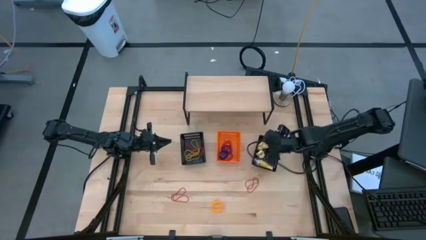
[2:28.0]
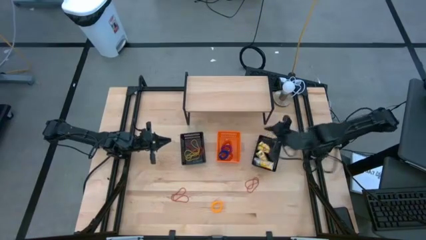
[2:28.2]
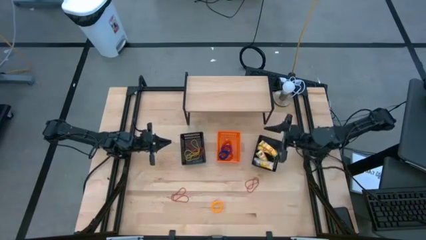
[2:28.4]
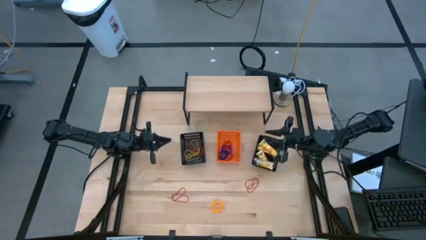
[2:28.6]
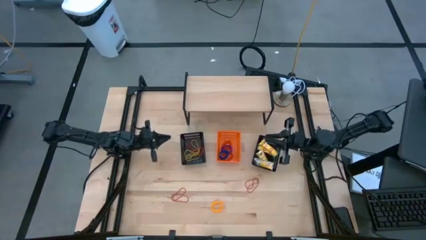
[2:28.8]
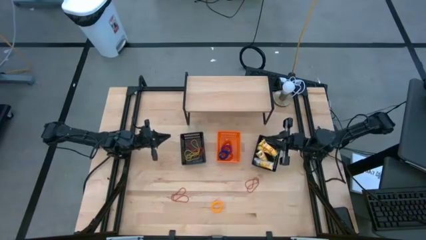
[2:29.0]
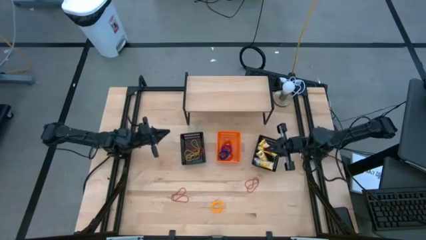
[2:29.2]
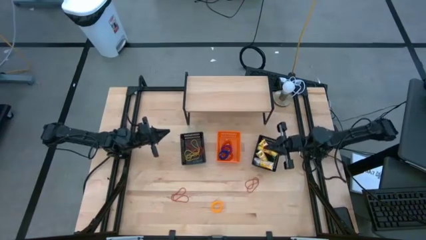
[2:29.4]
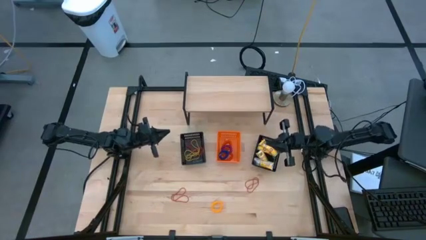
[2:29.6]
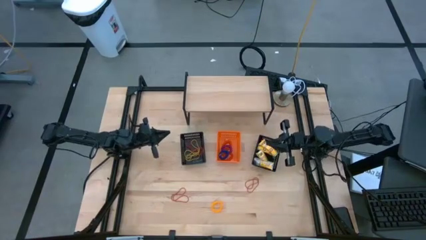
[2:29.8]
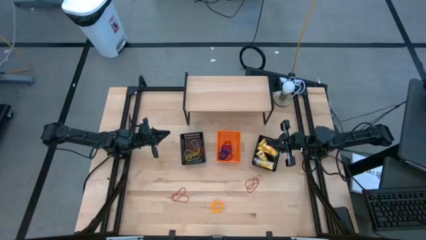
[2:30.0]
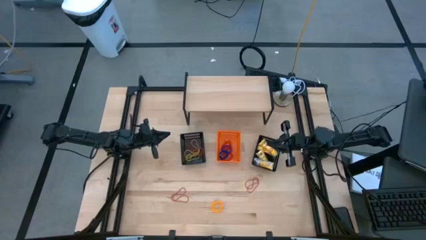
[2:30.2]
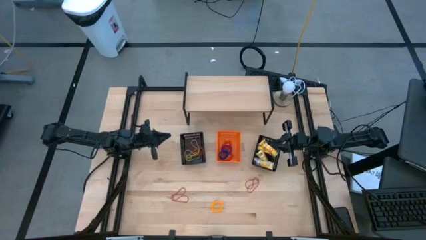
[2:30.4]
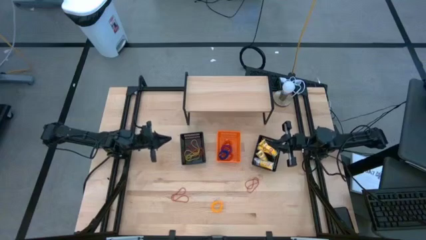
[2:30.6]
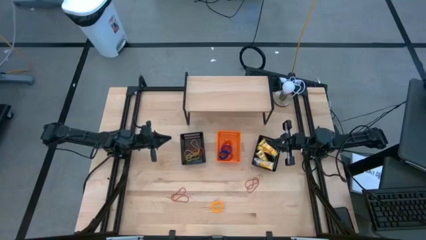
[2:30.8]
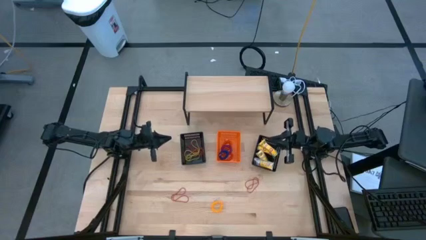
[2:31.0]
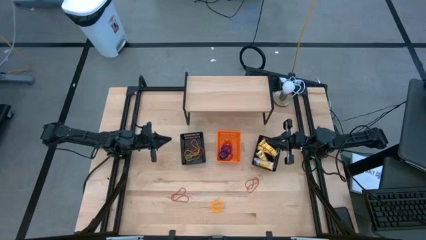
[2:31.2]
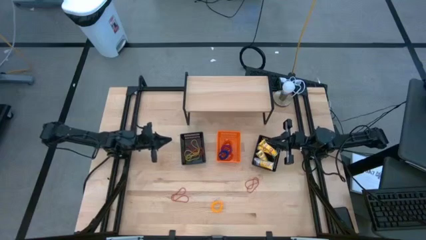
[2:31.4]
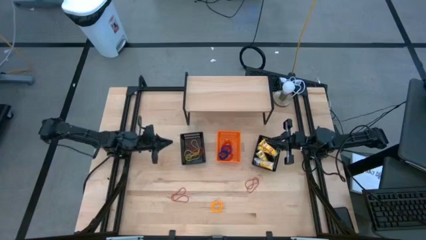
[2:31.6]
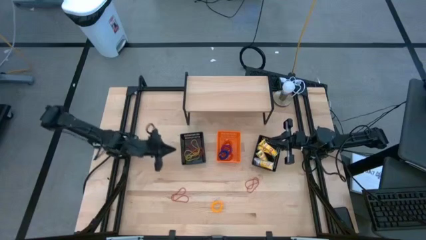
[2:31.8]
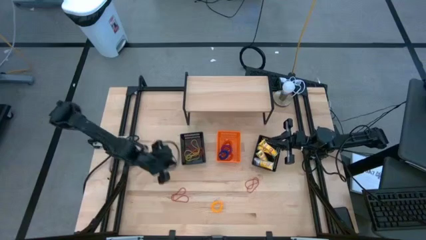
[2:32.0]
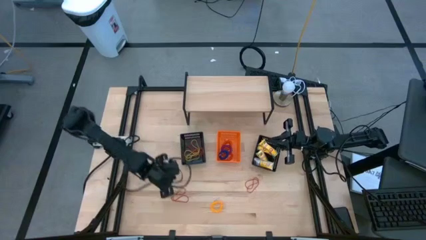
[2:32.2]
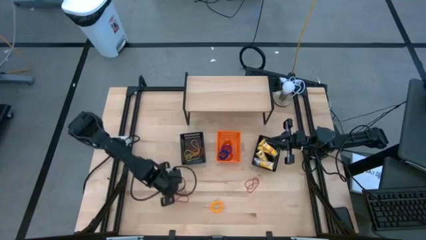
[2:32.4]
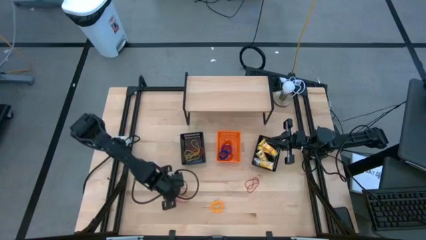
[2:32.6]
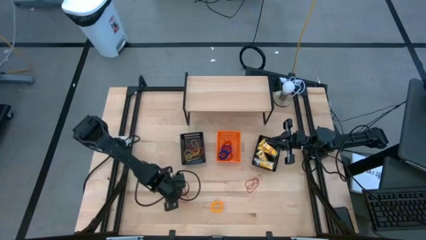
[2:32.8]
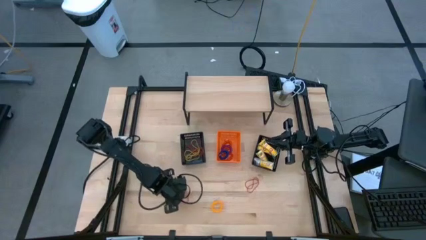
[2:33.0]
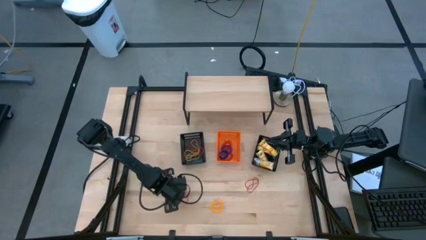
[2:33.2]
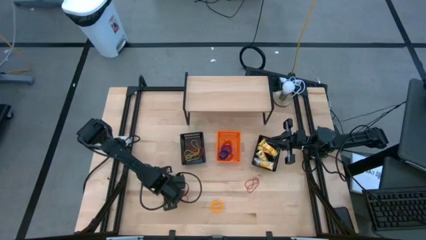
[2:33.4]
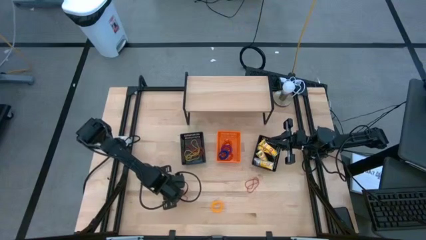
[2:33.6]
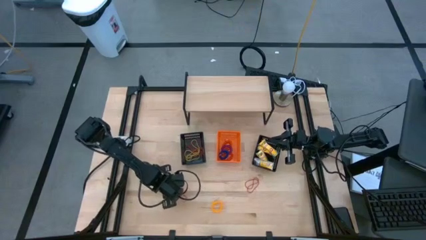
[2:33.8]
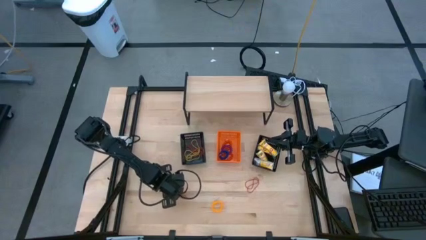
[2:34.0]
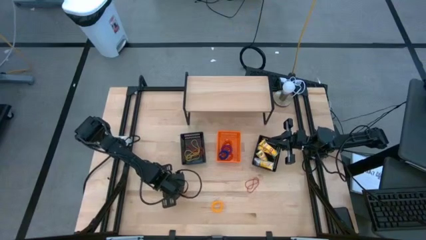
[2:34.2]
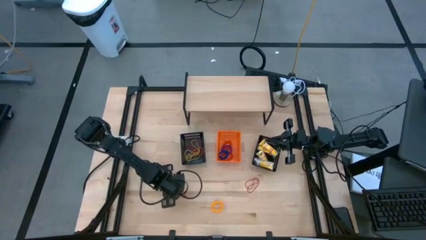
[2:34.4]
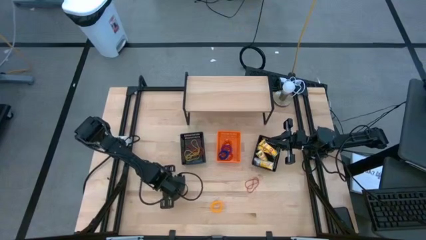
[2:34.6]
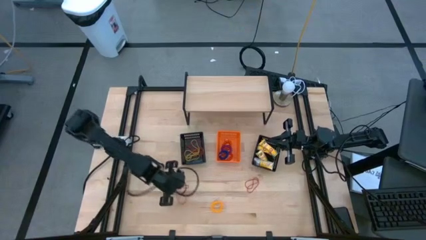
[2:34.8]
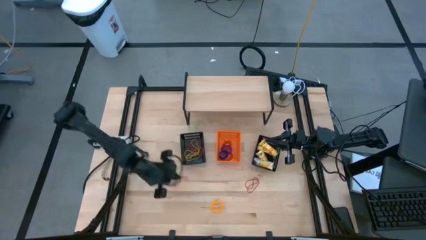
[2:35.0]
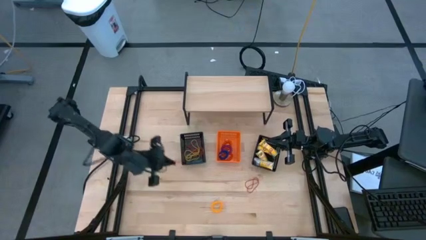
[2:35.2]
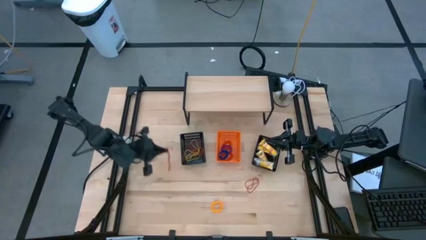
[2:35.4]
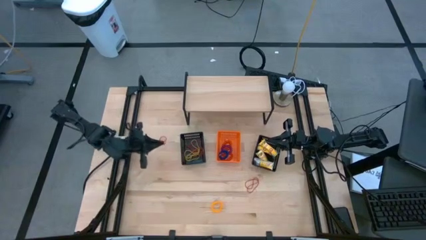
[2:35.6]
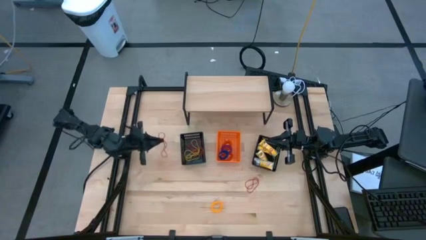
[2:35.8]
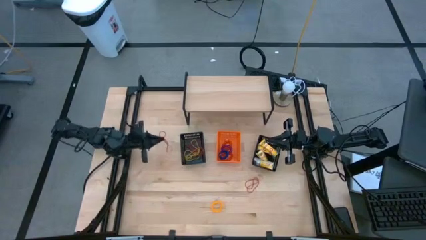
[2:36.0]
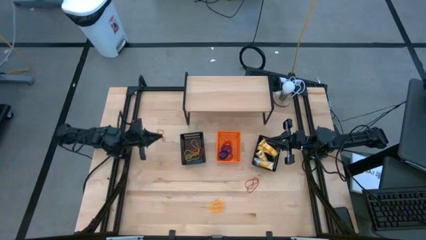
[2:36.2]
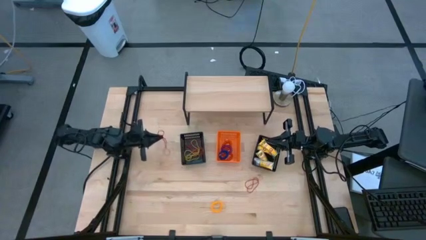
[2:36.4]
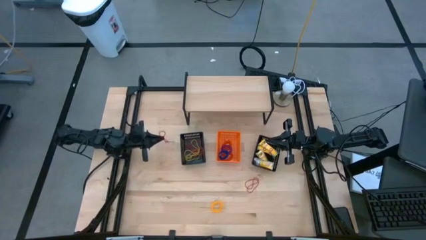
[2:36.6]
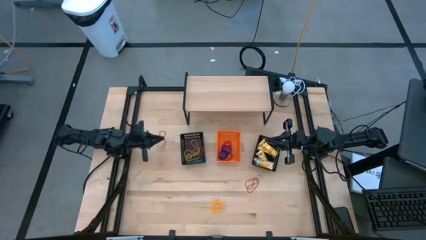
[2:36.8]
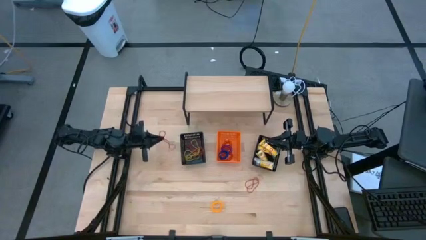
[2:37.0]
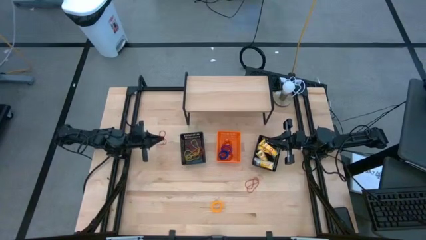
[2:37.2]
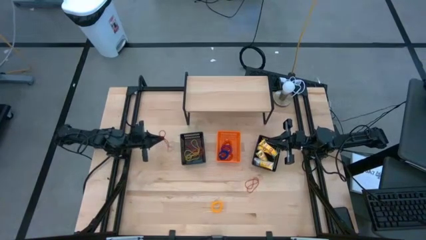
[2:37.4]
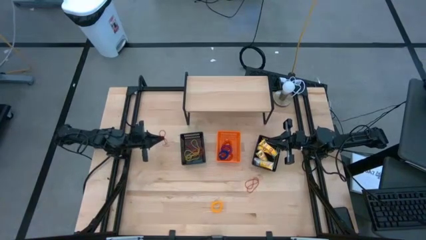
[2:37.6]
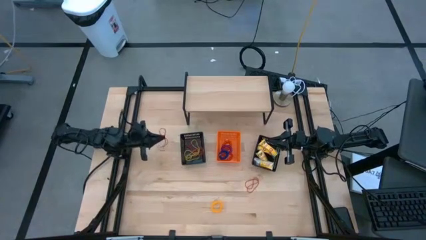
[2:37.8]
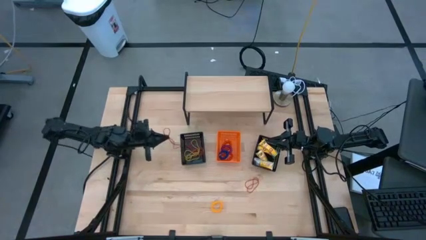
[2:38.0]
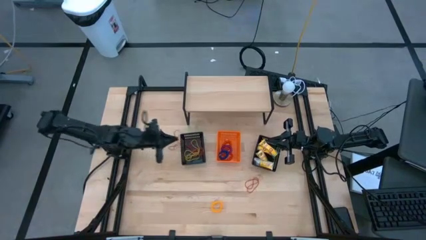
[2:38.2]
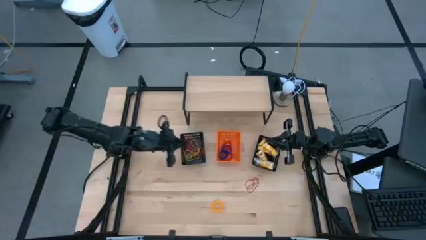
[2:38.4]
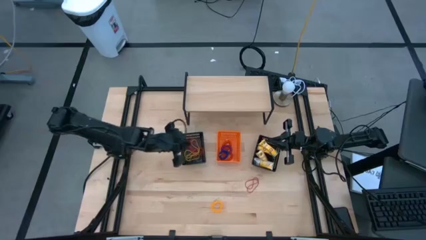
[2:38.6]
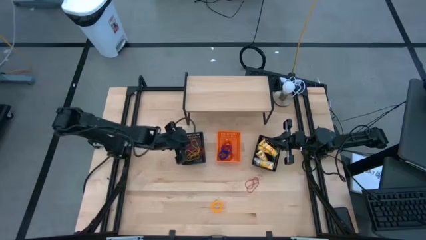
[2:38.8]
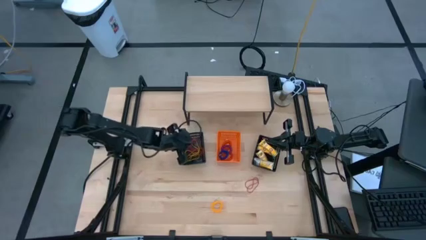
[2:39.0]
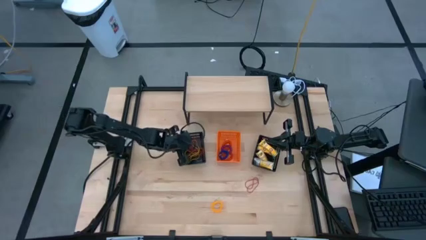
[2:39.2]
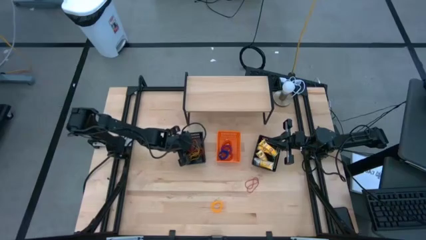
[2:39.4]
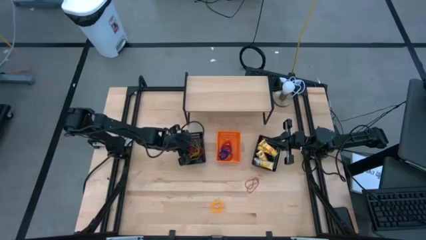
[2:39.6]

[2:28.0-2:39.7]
Task: Pick & Place Office Desk Supplies
Put the red rubber band into the left black bin

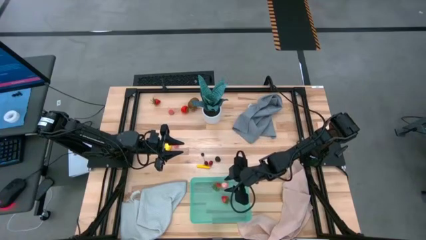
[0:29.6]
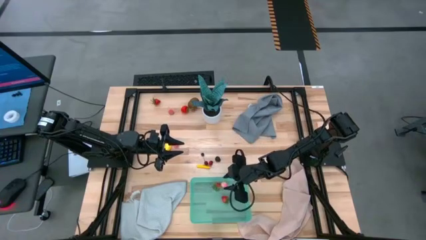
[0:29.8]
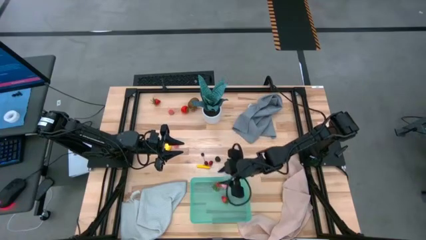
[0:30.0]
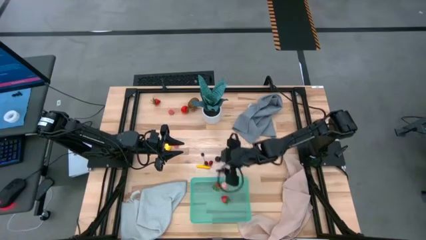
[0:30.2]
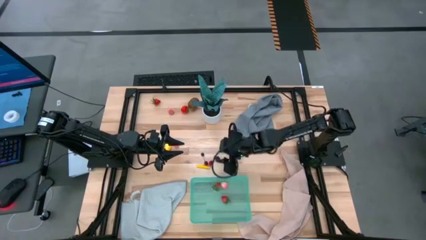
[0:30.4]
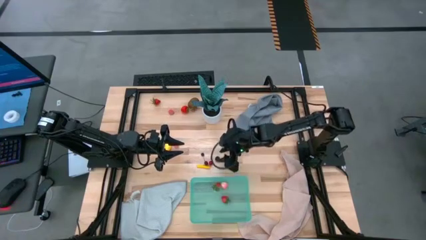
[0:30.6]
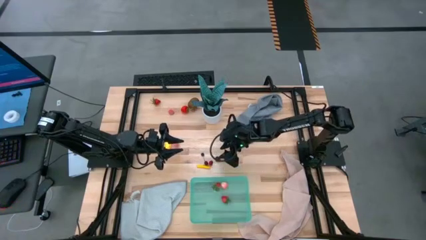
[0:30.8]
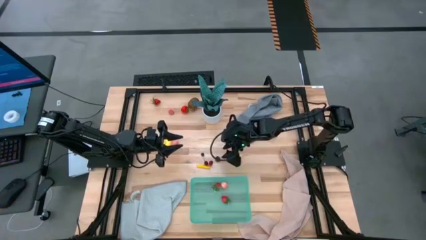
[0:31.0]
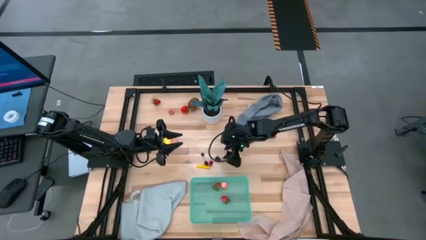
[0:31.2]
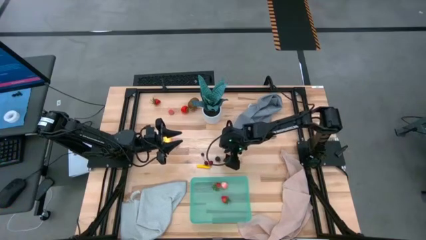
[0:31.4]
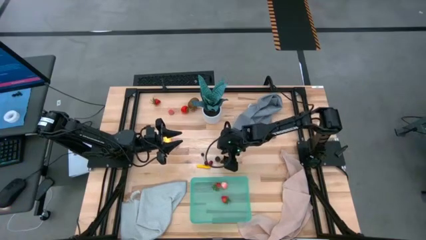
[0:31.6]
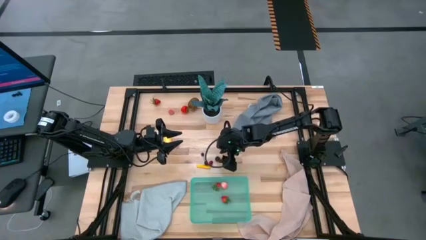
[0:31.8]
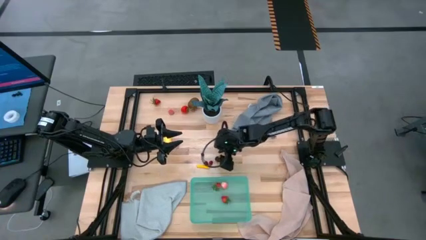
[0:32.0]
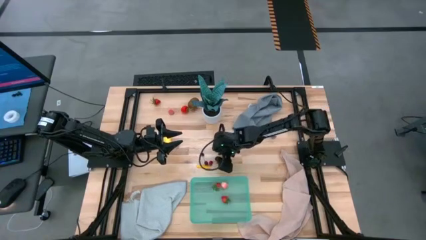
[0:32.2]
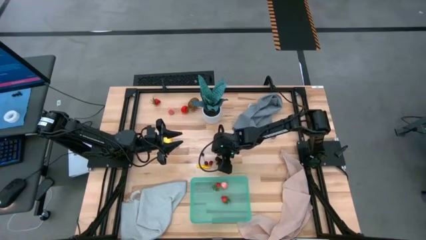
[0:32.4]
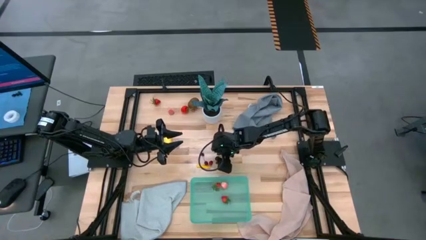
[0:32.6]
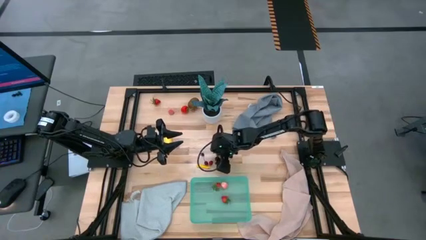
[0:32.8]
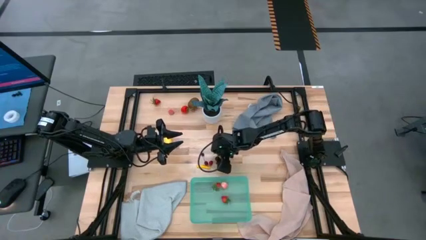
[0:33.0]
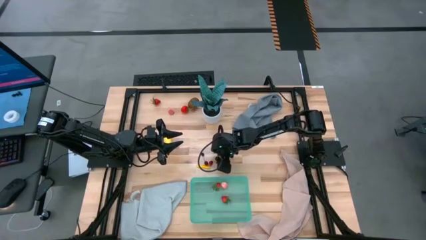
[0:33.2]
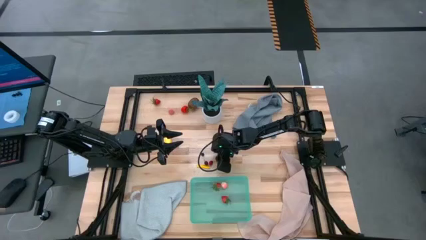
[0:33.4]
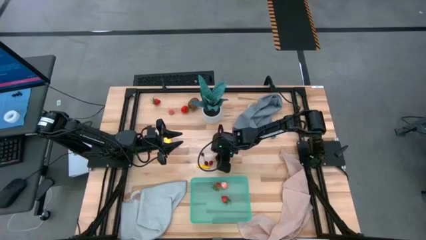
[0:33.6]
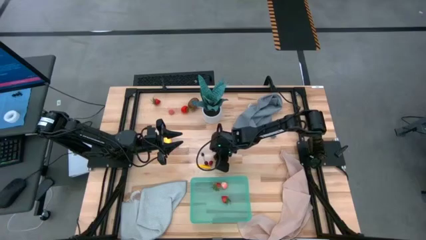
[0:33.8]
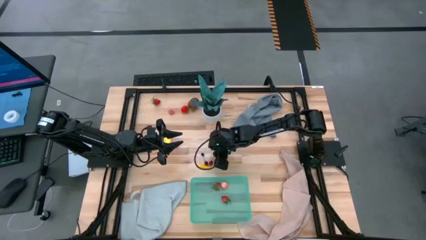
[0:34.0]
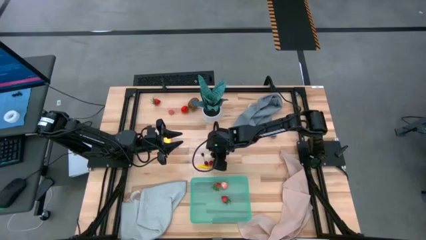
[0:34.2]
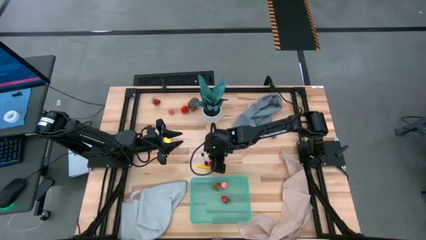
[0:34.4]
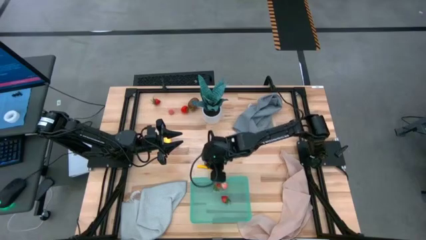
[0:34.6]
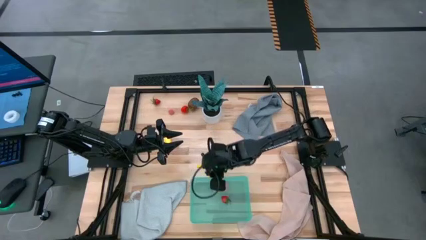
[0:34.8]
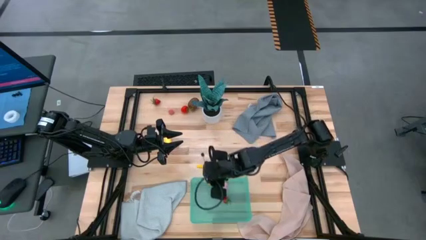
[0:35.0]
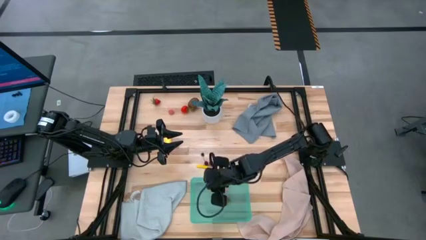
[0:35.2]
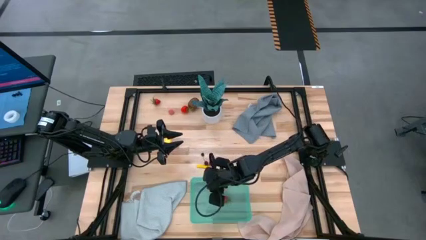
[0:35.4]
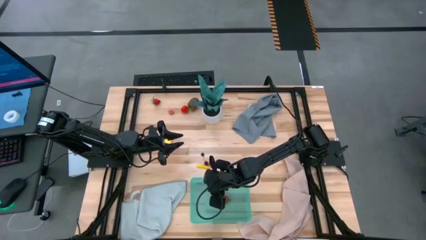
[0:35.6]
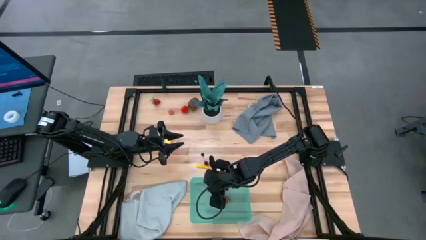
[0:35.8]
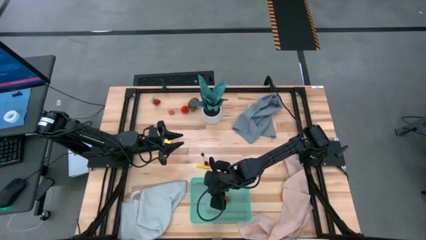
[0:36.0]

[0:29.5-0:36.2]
Task: Pick and placing Produce into tupperware
Put the blackberry into the green bin
